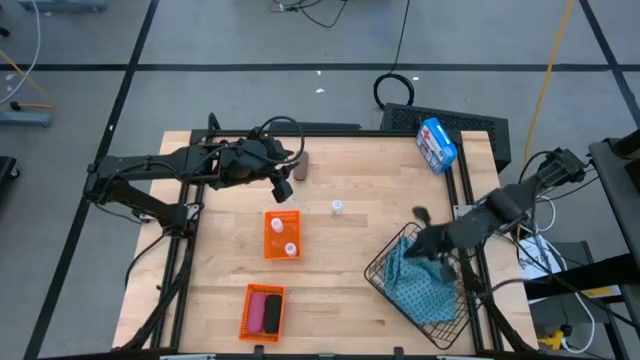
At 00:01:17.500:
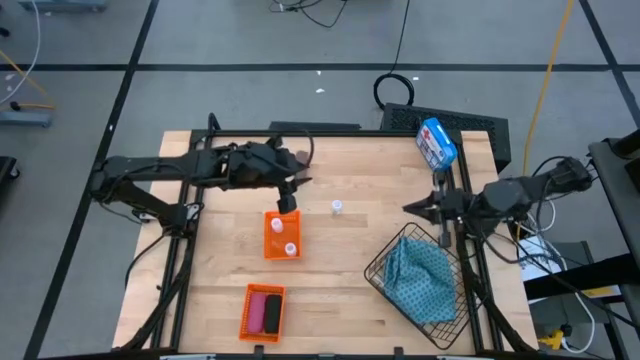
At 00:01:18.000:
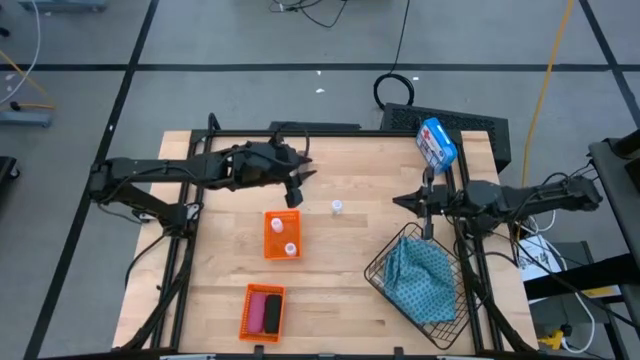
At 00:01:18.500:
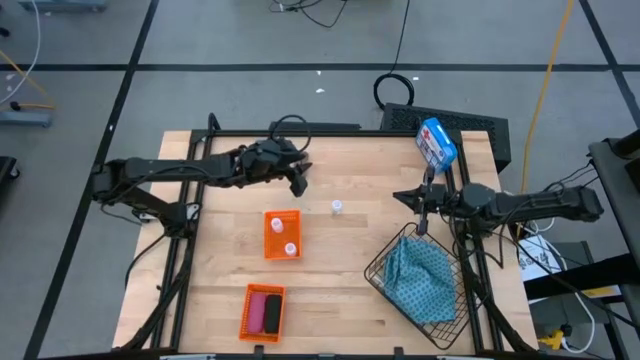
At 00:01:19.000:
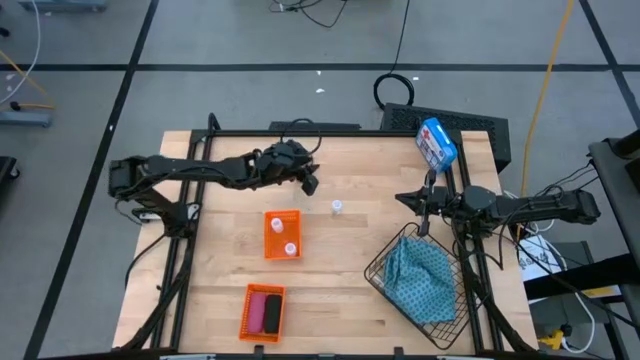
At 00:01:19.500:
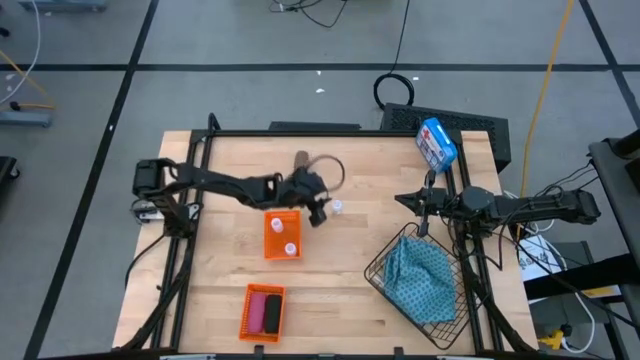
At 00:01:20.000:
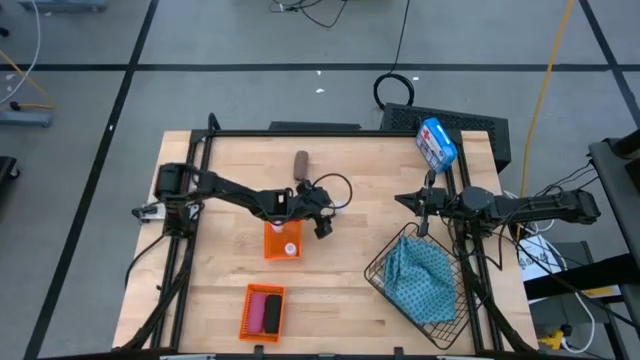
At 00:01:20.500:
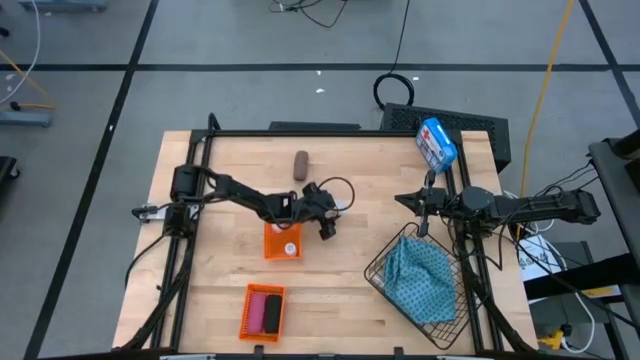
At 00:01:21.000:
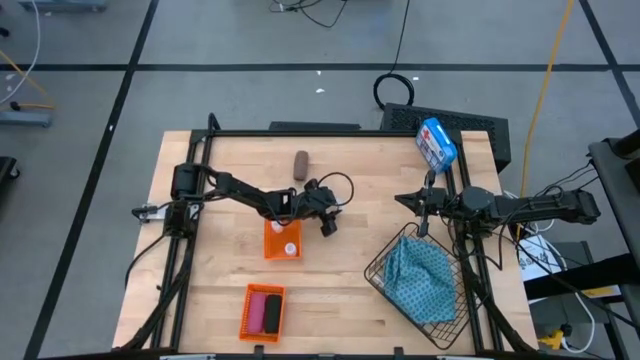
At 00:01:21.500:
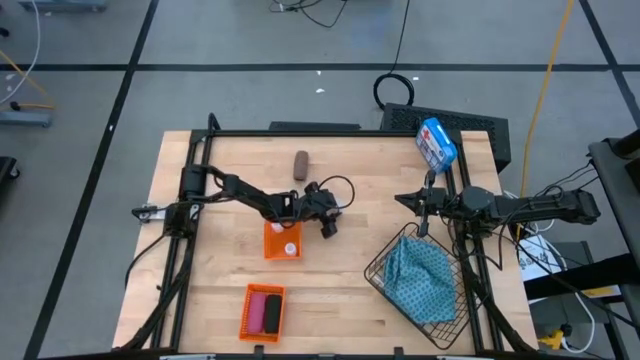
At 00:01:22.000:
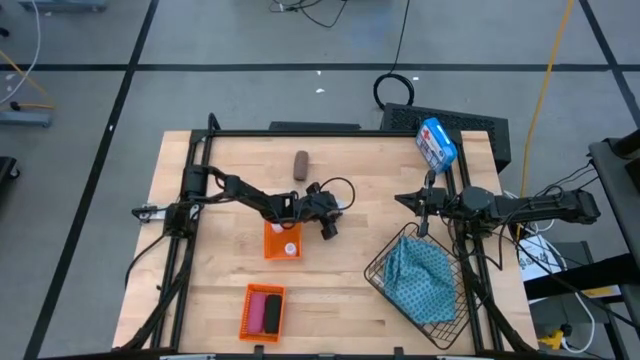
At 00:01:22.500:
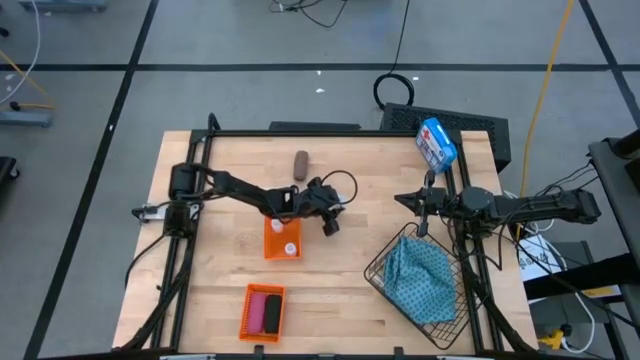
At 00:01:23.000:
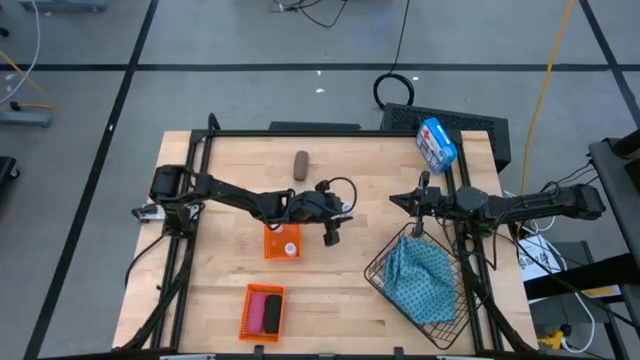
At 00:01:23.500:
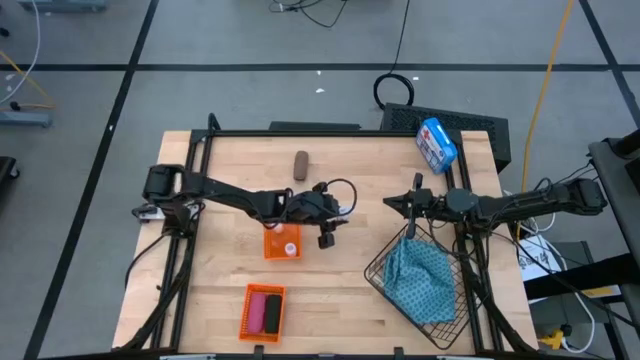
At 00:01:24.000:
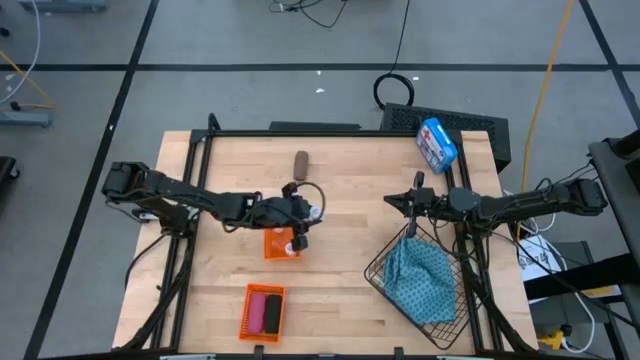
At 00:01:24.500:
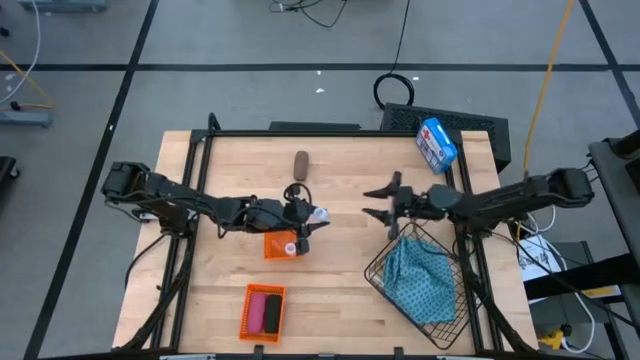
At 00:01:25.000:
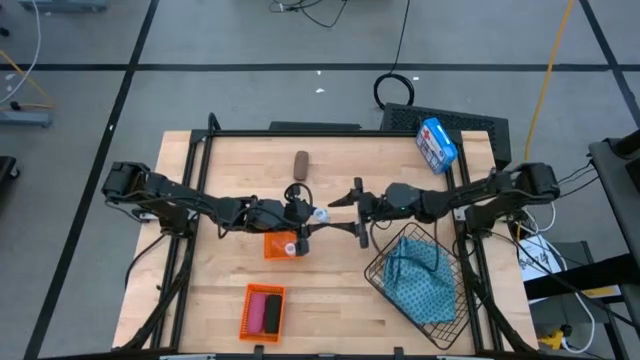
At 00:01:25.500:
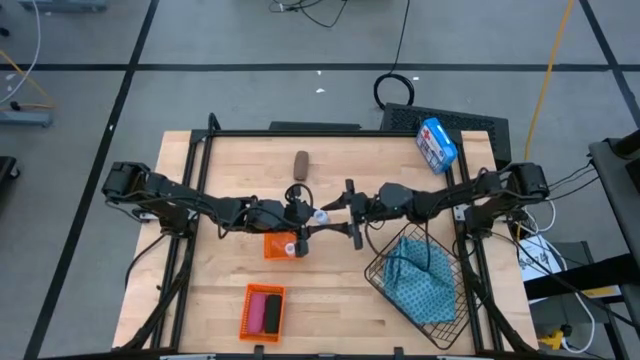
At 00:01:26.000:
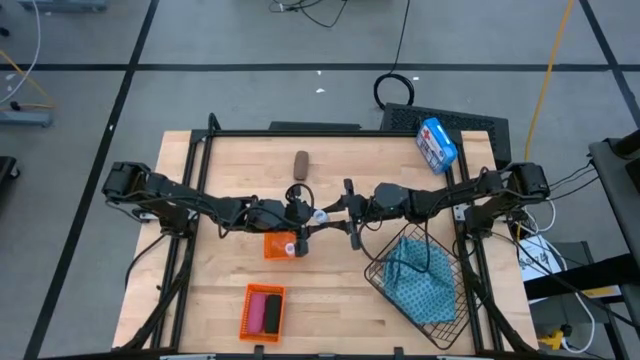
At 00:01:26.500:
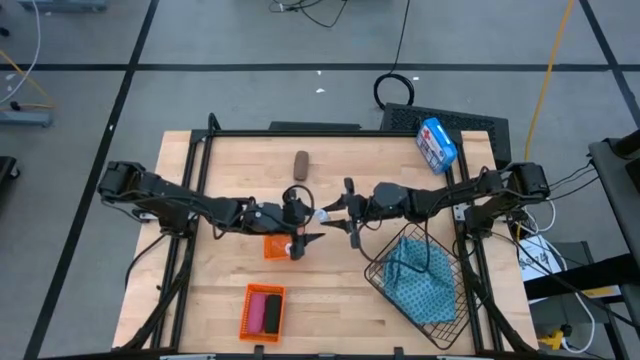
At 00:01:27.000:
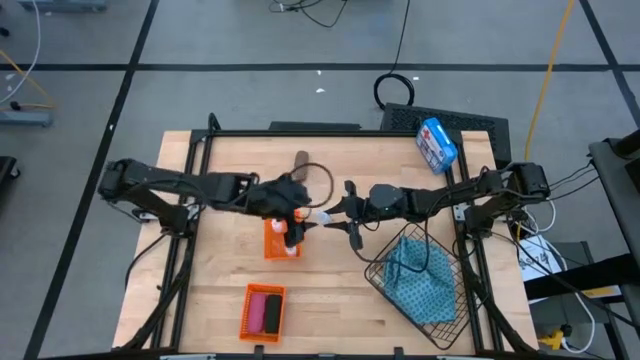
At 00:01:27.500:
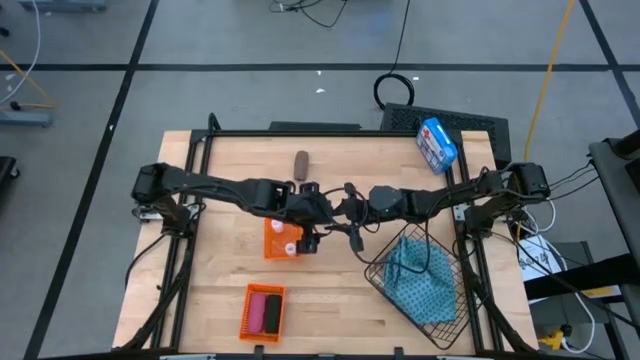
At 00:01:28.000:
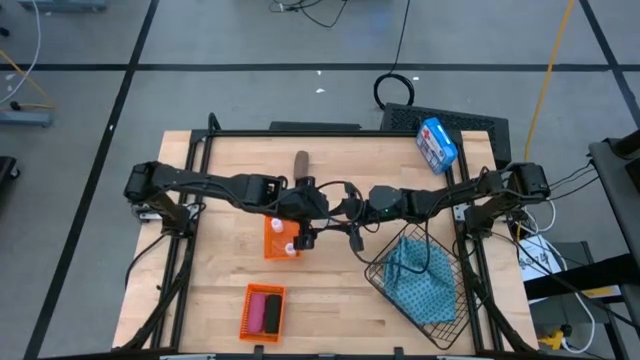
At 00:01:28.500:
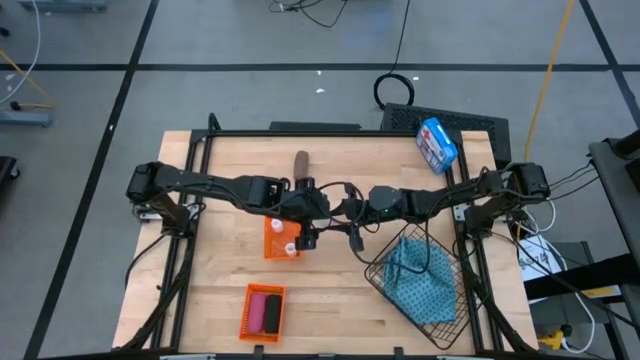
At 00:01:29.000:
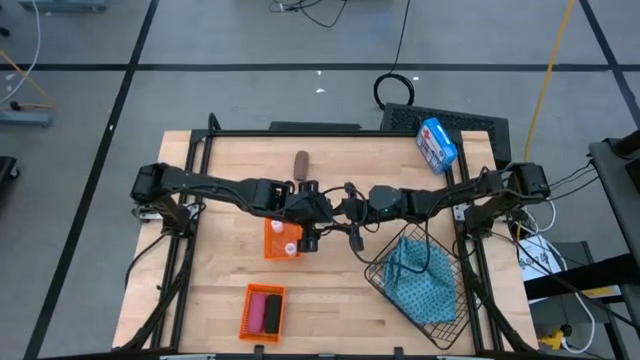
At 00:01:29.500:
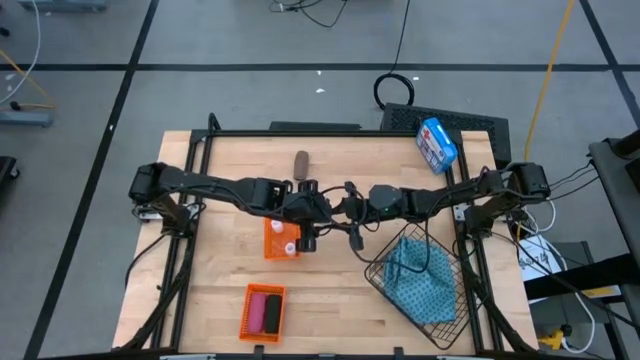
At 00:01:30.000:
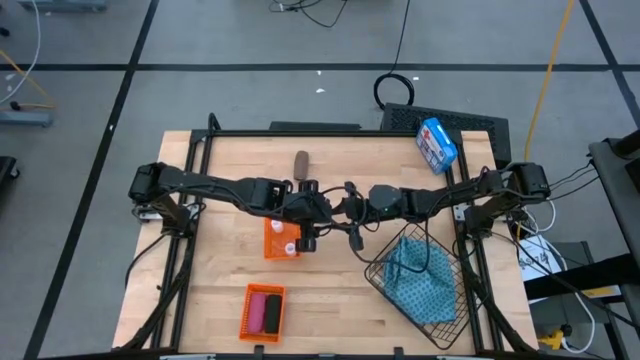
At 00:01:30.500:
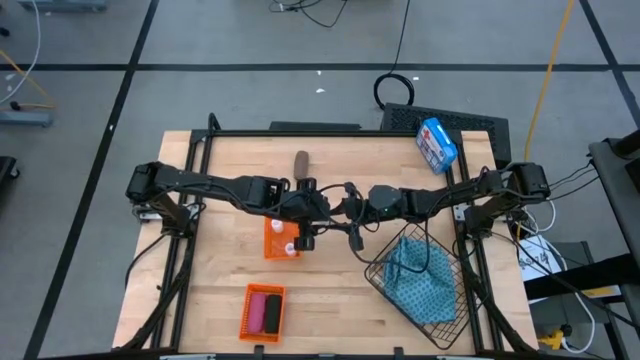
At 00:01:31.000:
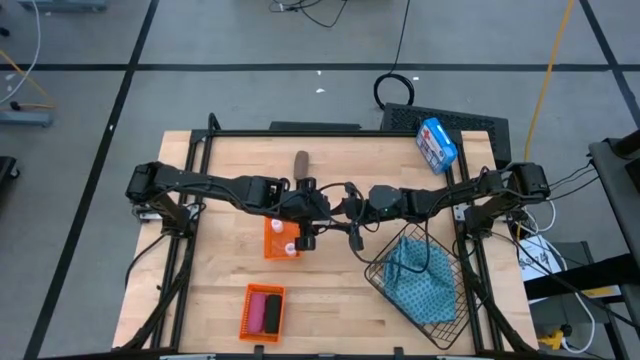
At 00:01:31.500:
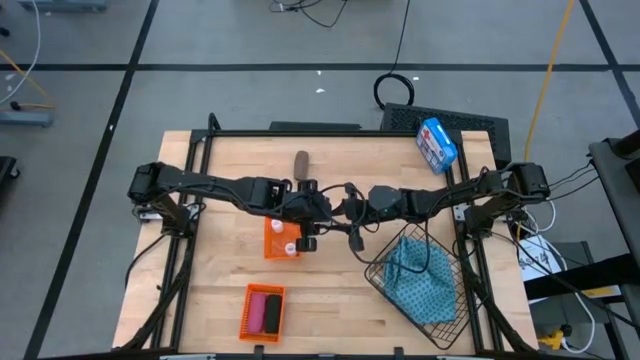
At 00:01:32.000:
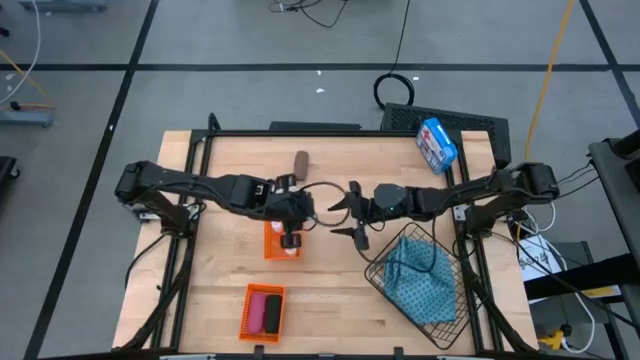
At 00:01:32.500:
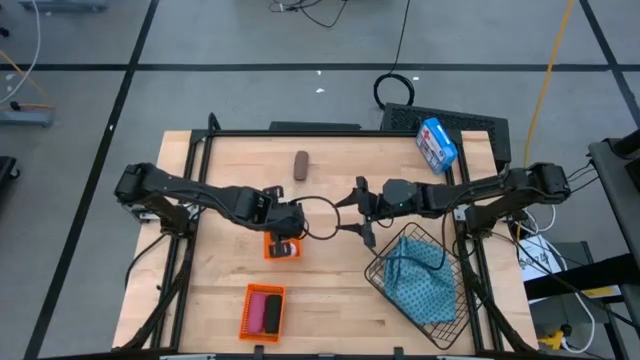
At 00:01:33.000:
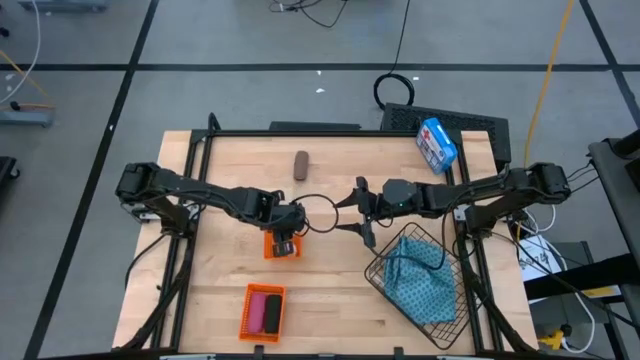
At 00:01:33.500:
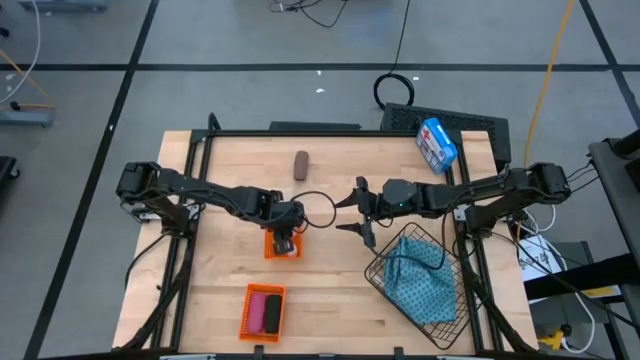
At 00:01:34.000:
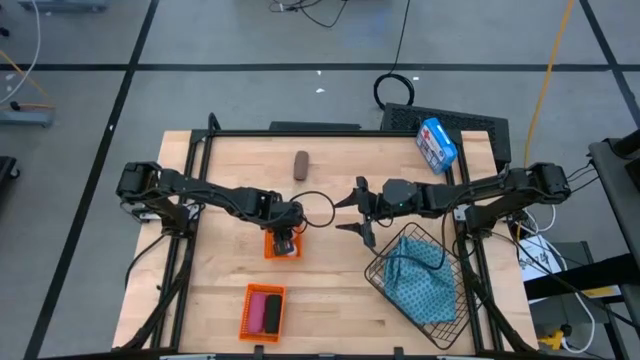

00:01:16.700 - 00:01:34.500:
Task: Pick & Place Medicine items
Put the transparent medicine bottle into the top orange basket
